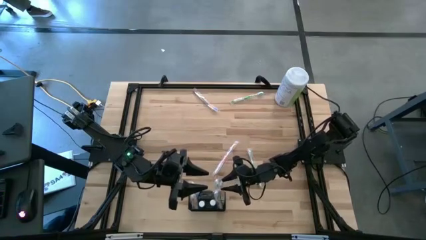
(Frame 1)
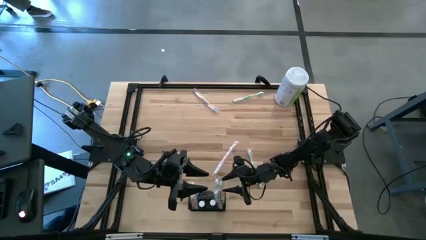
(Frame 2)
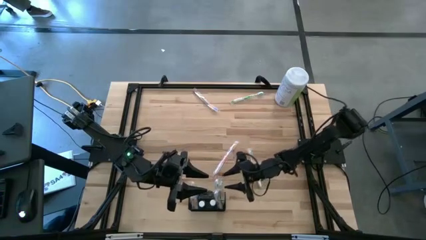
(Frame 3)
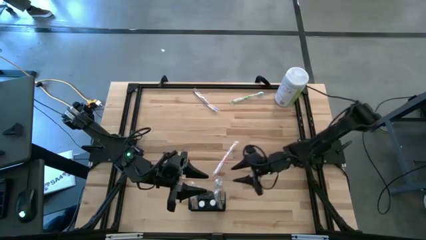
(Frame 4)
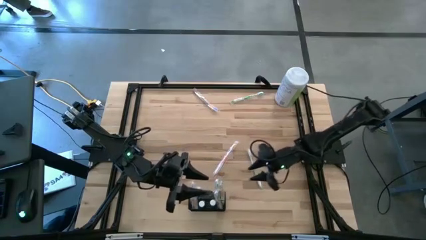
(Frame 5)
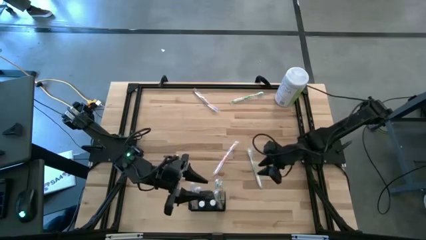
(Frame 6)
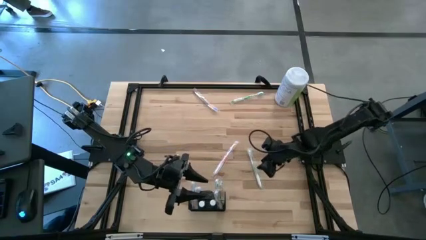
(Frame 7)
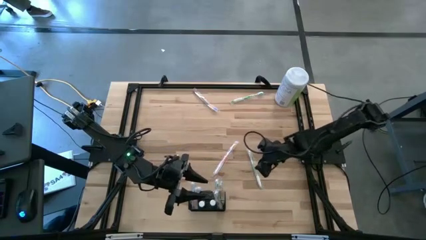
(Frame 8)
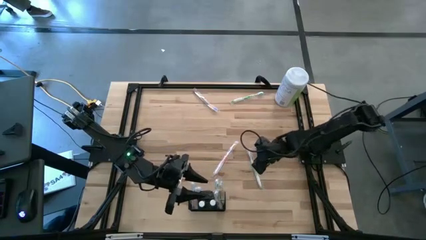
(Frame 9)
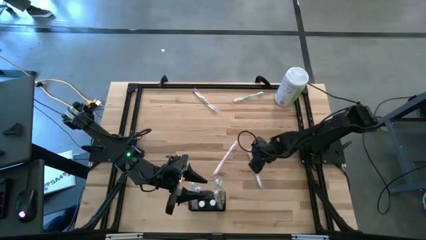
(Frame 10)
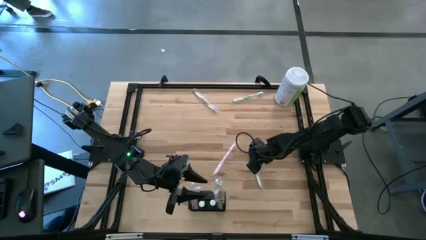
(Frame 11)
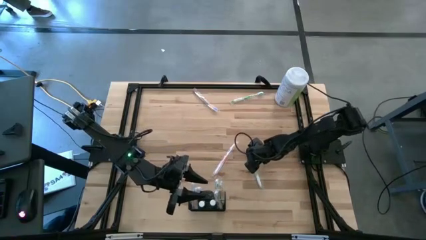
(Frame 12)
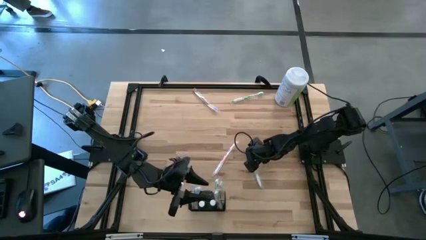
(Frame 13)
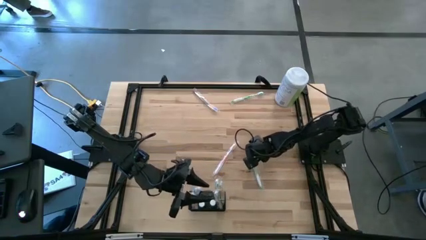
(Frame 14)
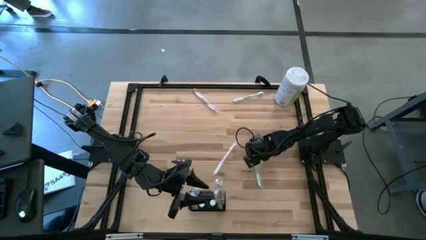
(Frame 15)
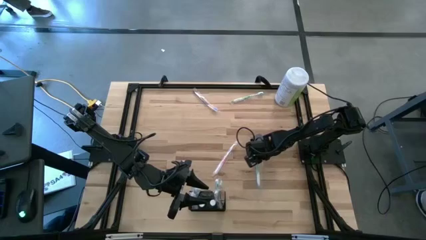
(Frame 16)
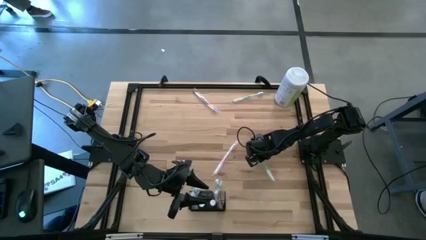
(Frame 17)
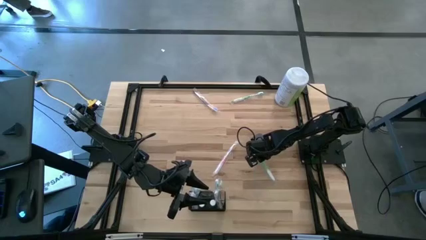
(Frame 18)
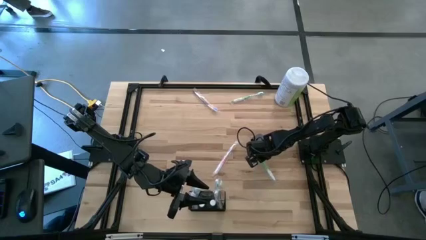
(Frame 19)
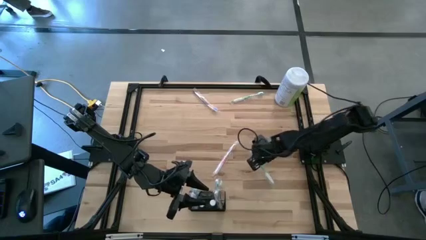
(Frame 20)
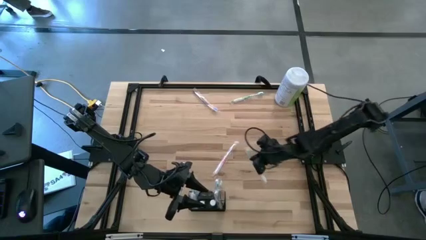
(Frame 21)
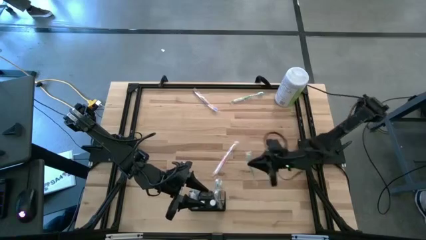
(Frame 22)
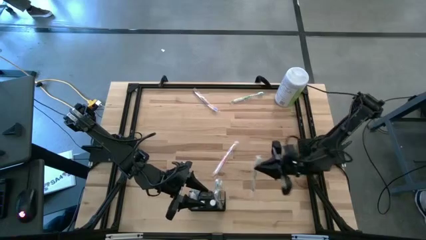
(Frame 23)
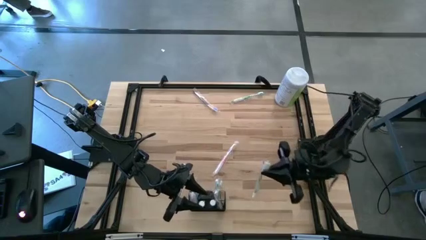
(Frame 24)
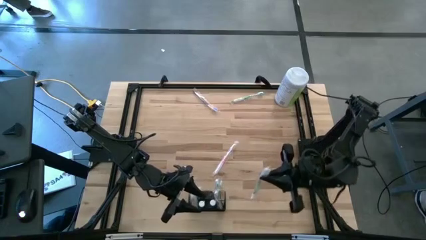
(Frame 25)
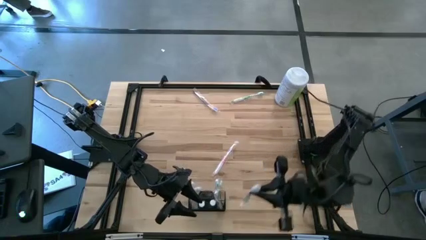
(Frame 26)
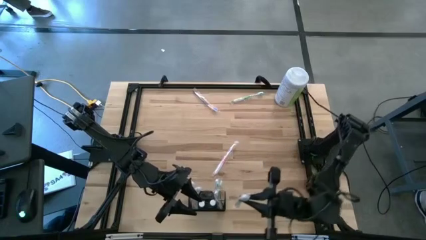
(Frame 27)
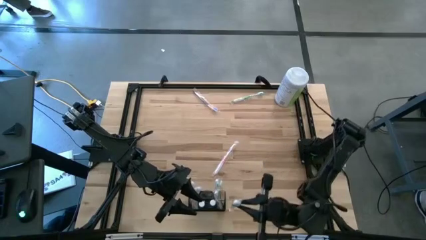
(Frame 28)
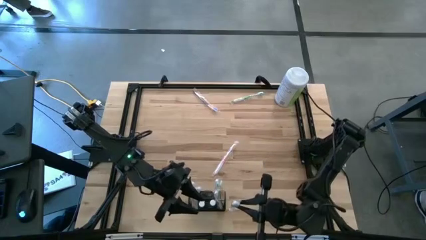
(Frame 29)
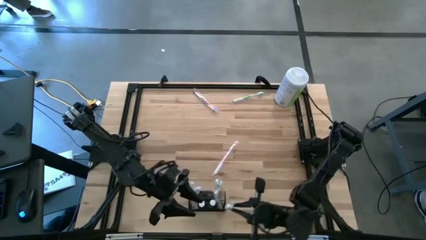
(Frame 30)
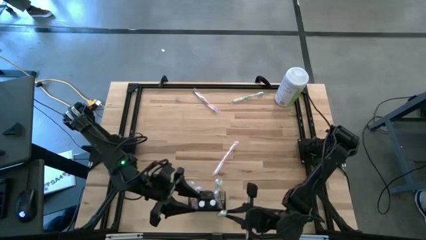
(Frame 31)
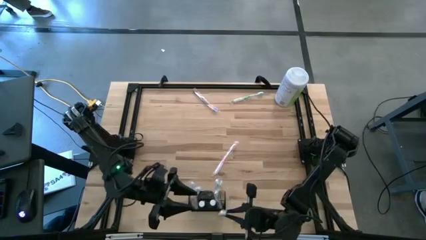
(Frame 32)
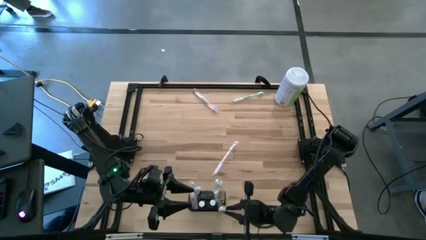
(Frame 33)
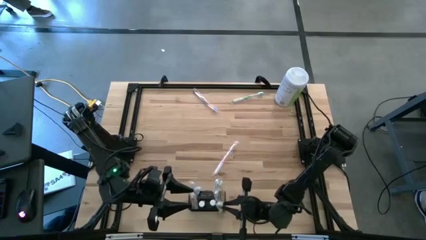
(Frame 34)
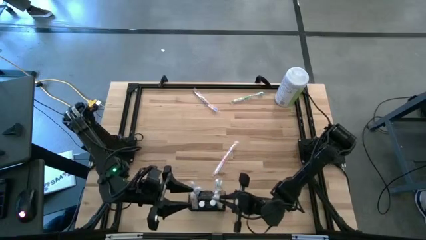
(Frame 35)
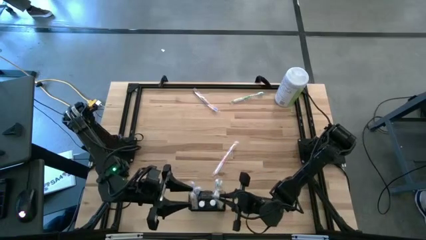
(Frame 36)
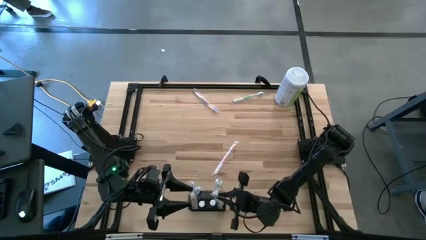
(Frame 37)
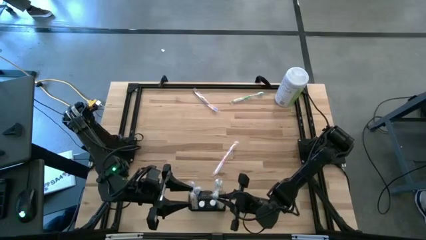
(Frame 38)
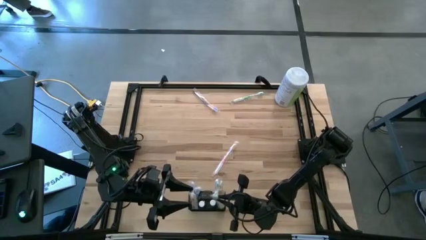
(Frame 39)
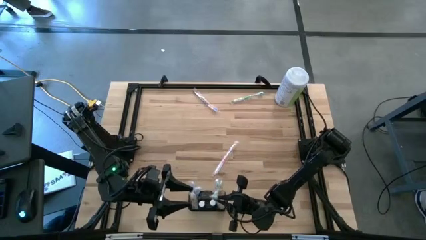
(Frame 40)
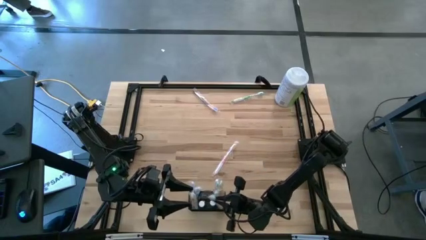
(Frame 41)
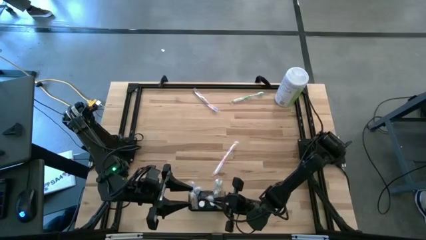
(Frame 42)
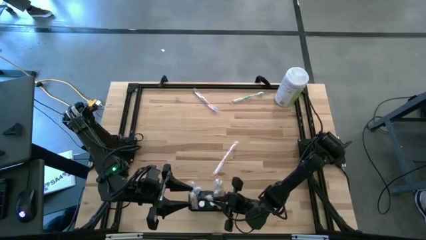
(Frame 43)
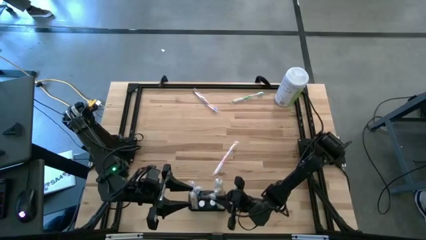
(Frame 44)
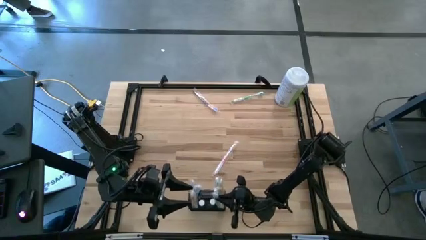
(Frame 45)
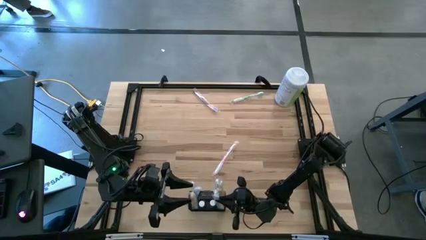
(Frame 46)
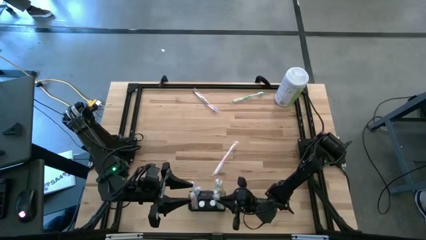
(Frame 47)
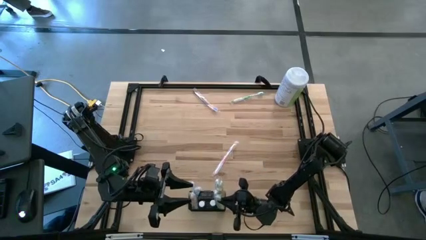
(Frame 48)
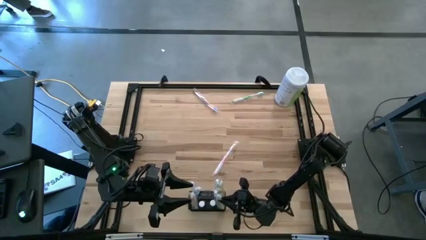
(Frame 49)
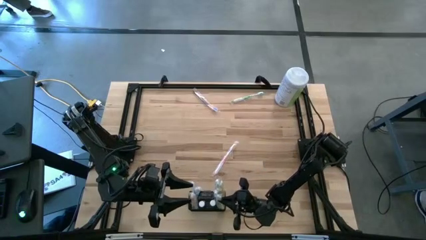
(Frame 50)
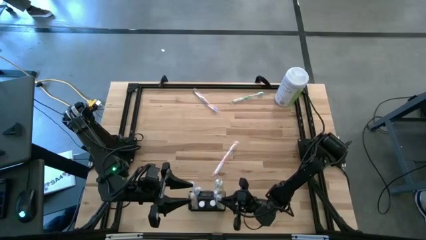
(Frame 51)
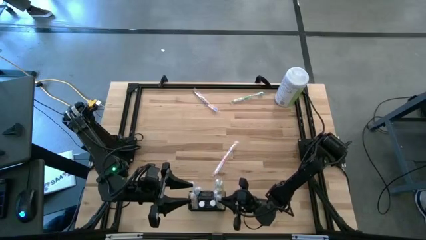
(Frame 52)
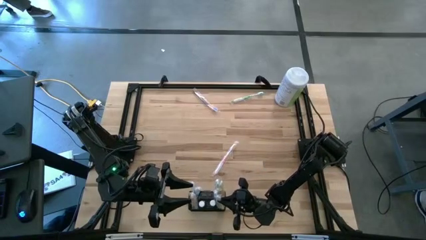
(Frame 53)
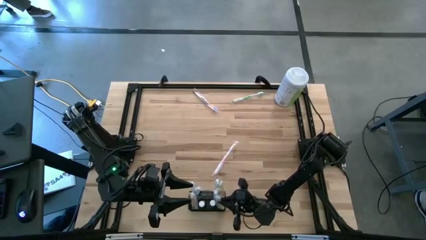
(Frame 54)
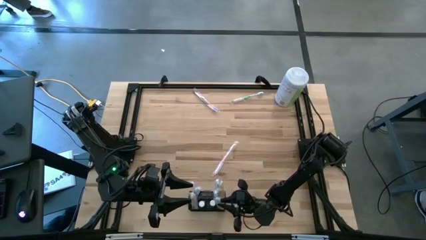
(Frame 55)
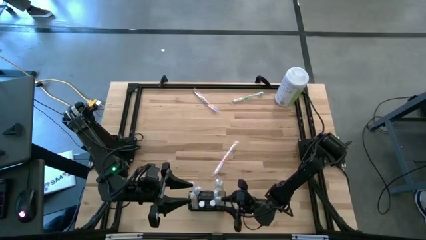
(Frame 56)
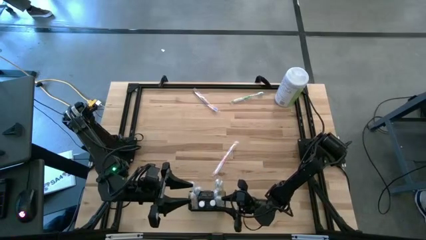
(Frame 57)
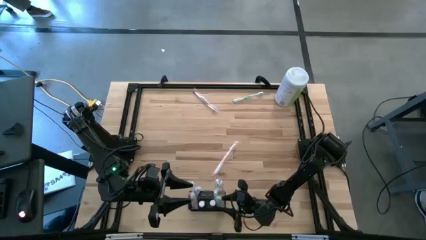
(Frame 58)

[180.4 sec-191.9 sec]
Task: Pick & Place toothbrushing station
Put the bottom green toothbrush into the black wire organizer

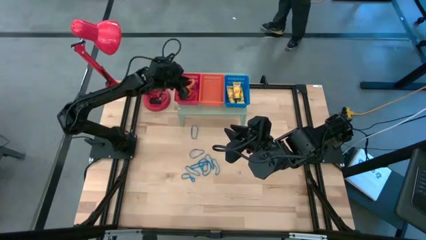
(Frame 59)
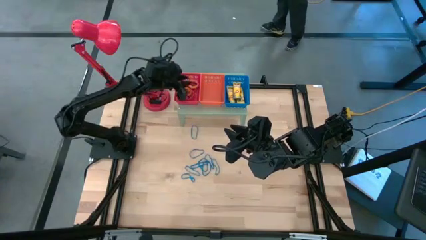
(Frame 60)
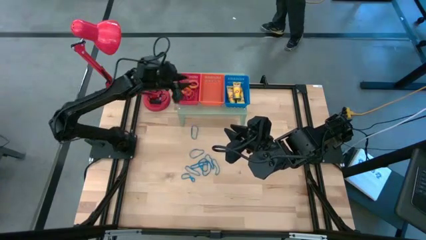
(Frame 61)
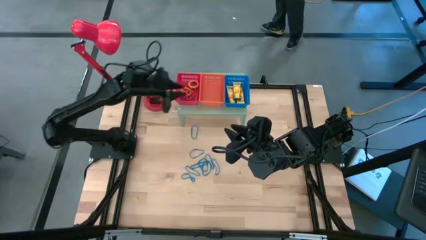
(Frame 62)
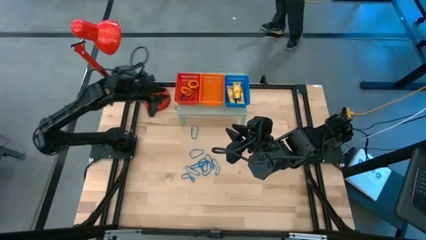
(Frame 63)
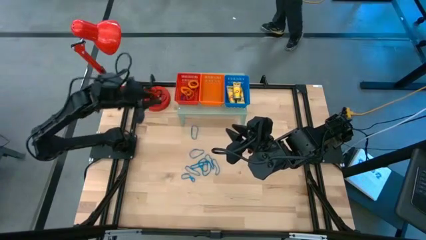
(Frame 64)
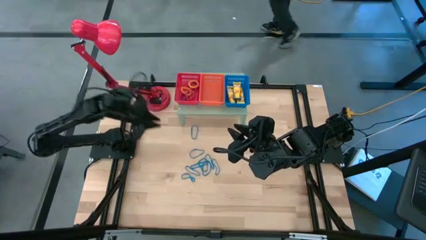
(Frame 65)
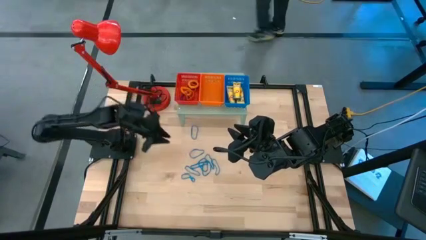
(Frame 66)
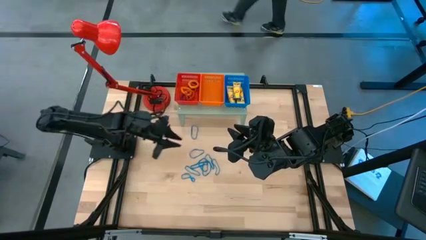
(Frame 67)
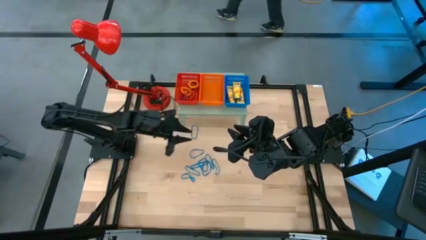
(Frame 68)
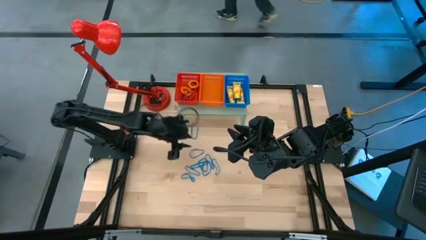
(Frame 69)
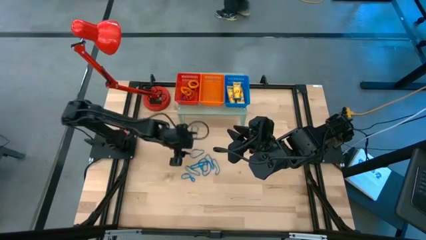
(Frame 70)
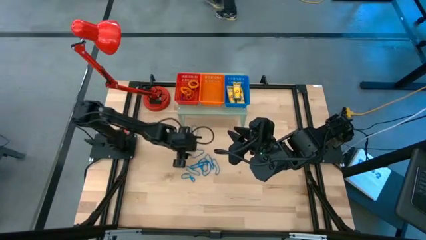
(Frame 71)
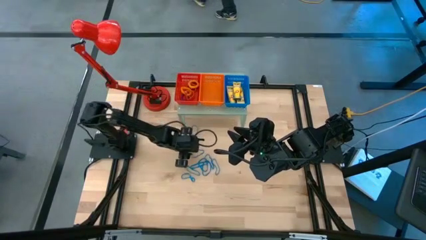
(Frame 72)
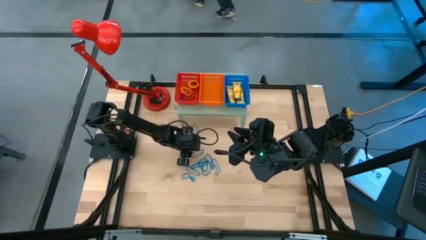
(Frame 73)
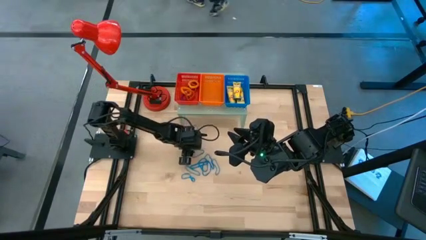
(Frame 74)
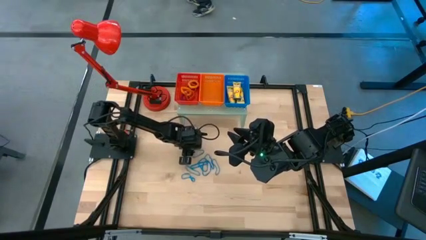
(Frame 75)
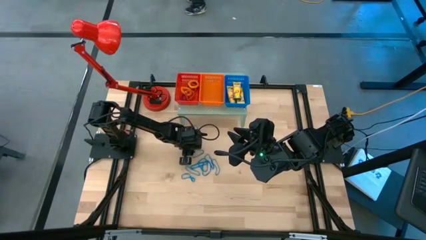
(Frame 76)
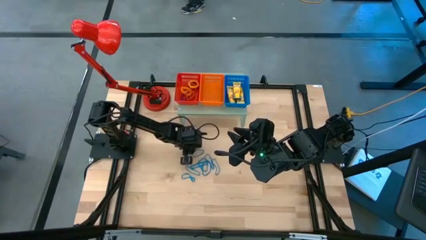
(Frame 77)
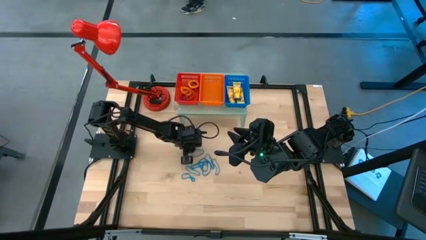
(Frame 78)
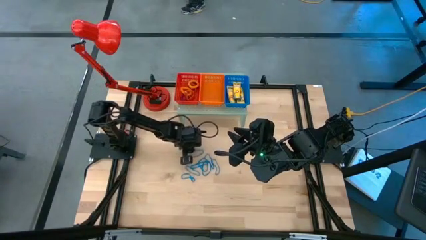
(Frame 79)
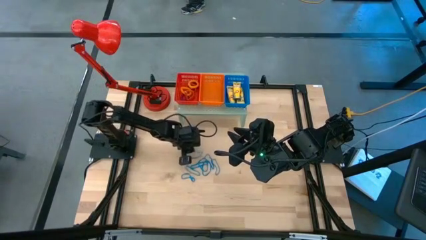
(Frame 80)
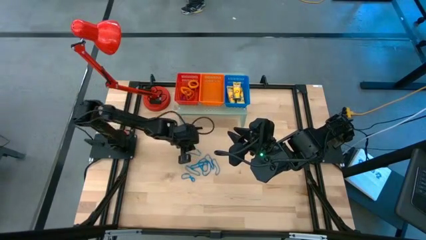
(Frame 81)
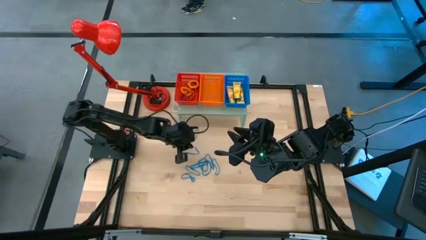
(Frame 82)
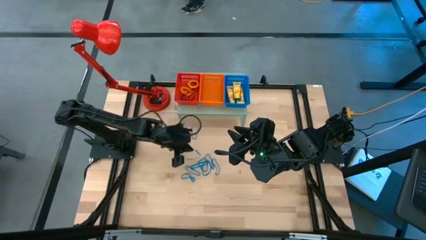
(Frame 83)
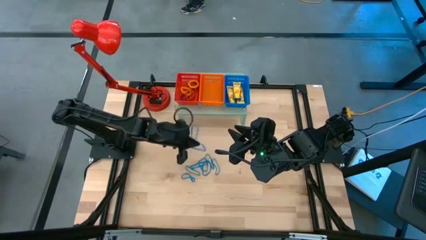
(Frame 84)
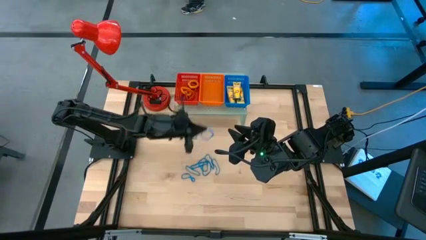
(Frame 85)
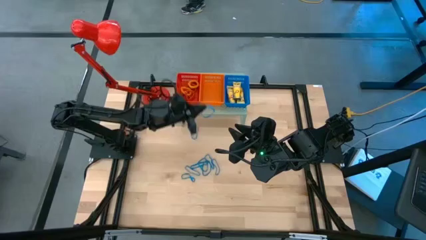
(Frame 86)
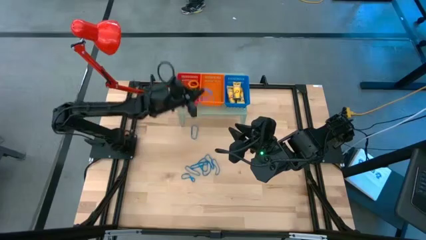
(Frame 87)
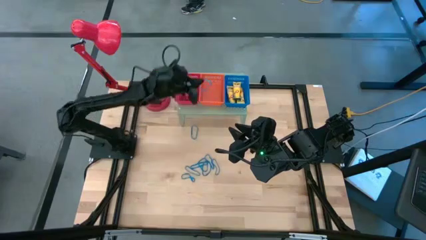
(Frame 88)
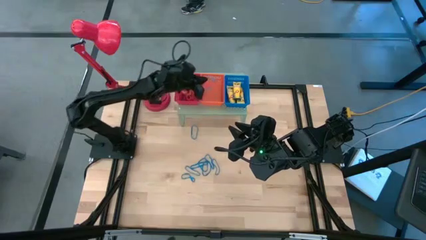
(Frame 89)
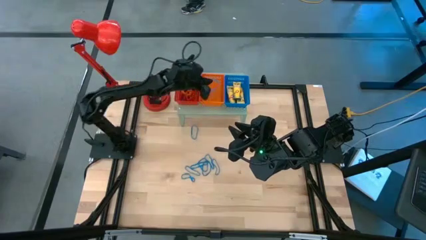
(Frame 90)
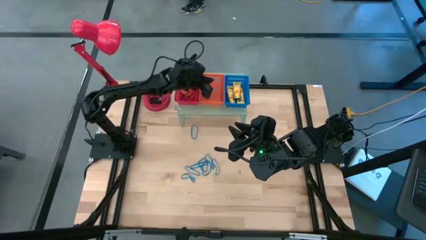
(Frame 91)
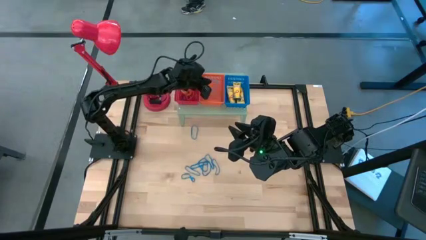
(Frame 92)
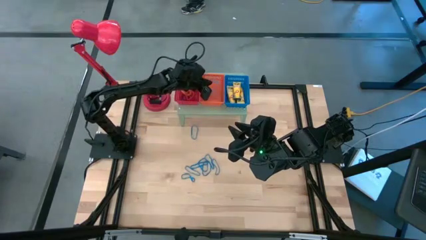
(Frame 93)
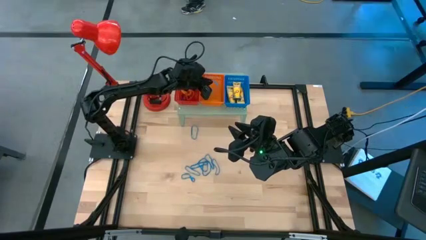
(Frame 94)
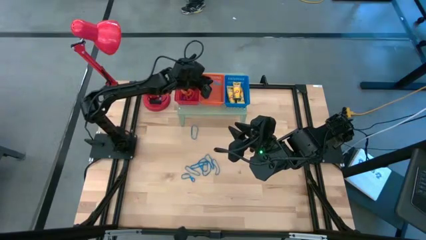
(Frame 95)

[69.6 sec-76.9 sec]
Task: Pick & Place Office Desk Supplies
Put the blue rubber band into the orange bin on the shelf
